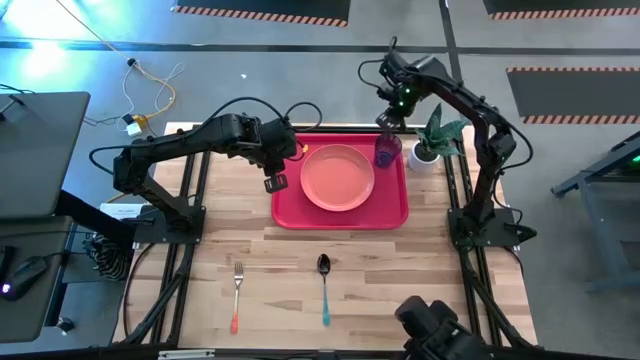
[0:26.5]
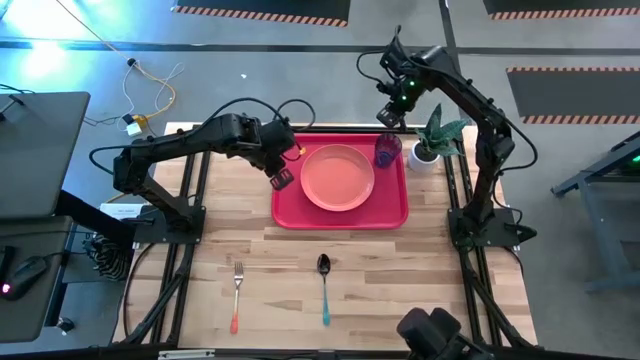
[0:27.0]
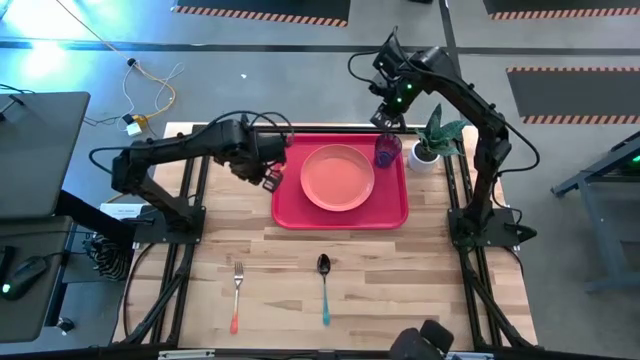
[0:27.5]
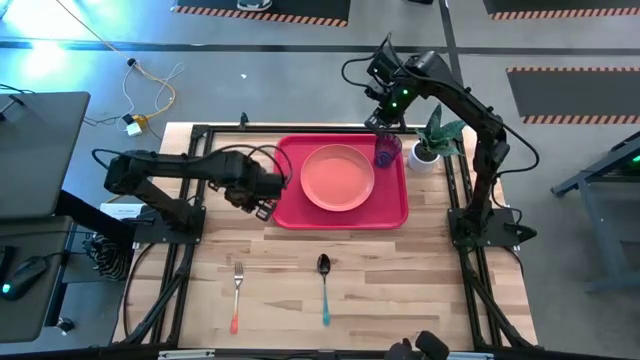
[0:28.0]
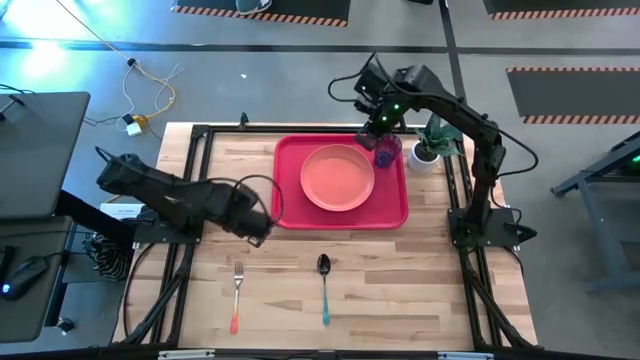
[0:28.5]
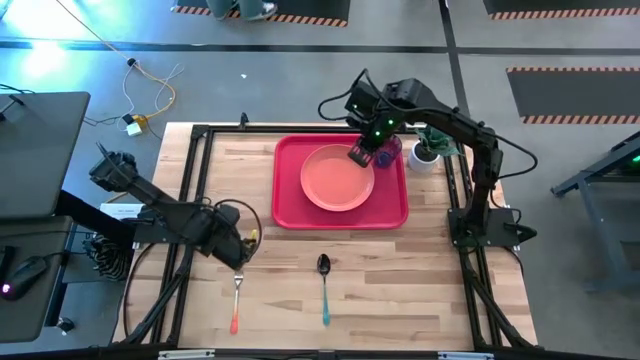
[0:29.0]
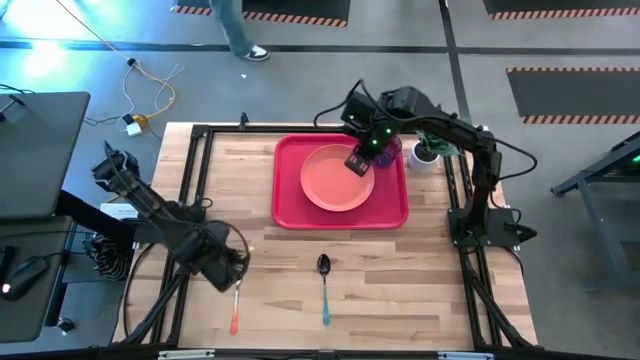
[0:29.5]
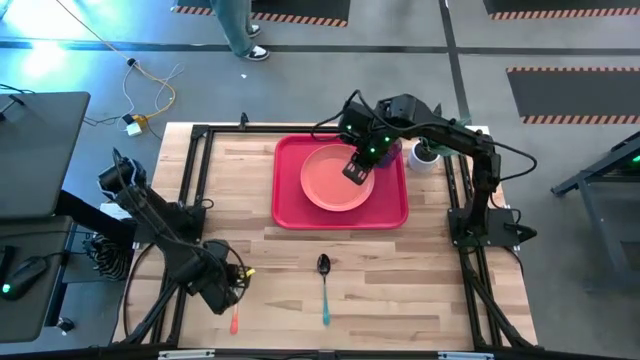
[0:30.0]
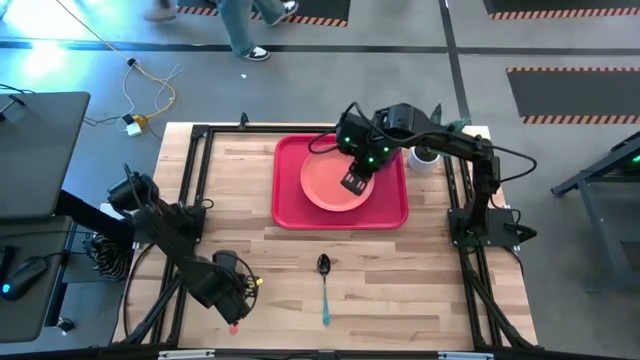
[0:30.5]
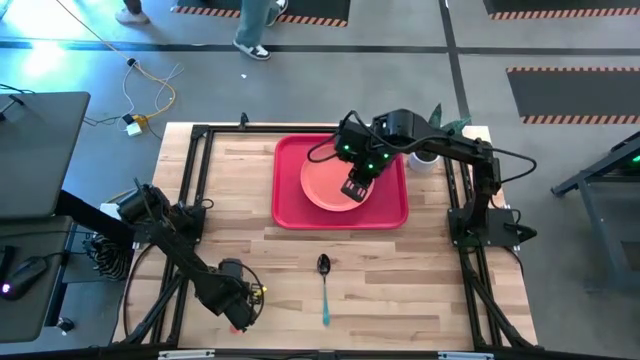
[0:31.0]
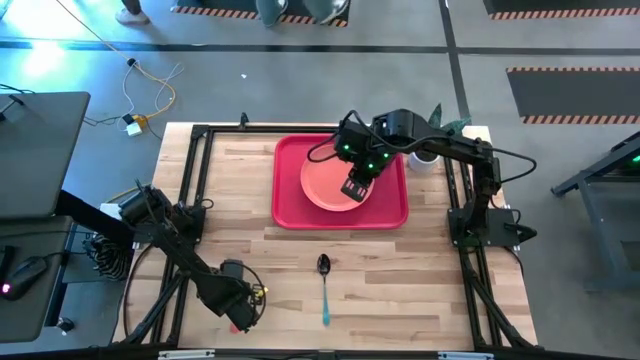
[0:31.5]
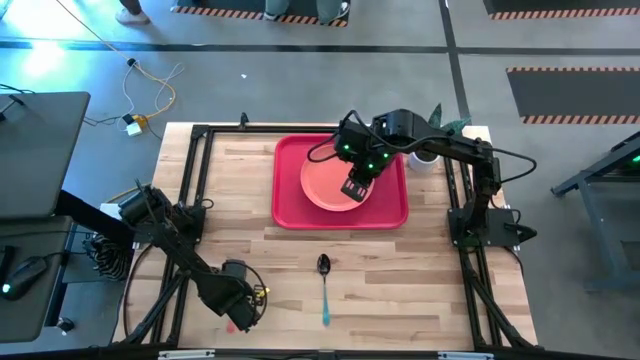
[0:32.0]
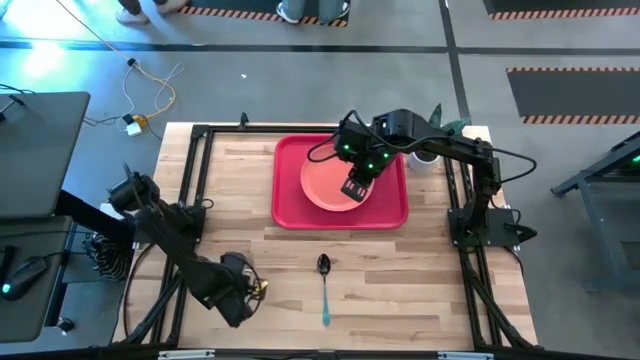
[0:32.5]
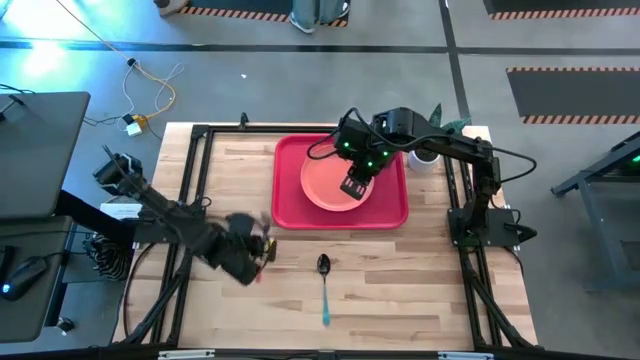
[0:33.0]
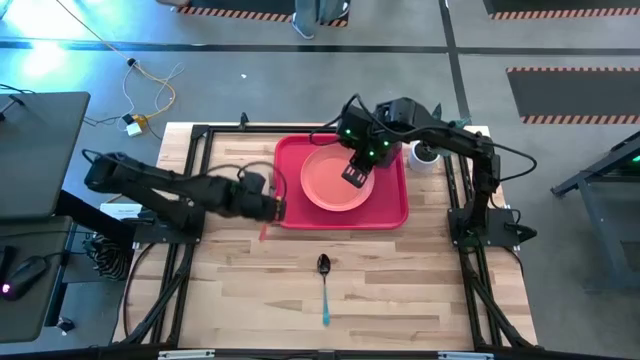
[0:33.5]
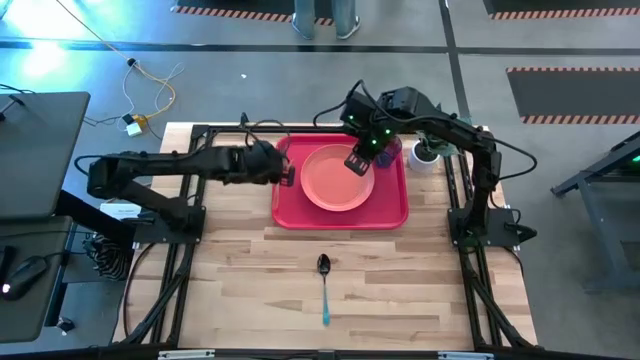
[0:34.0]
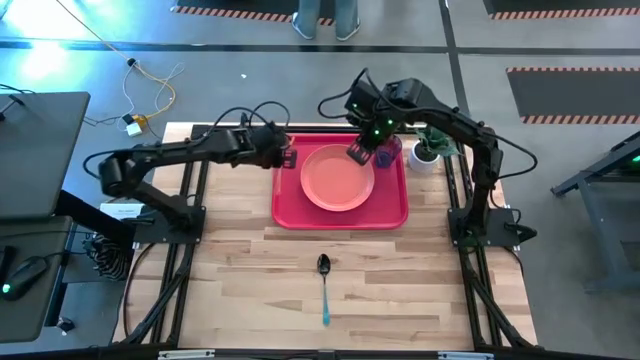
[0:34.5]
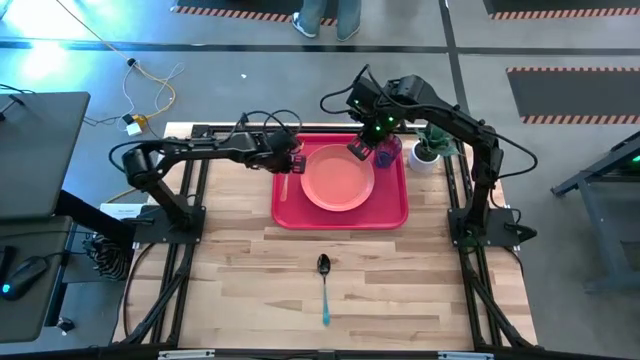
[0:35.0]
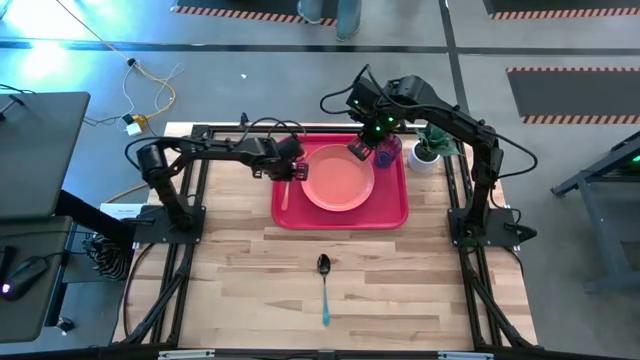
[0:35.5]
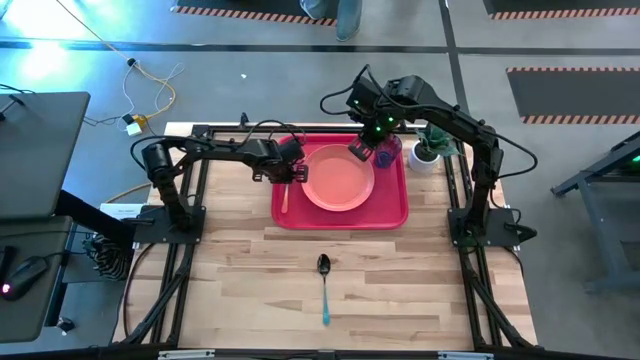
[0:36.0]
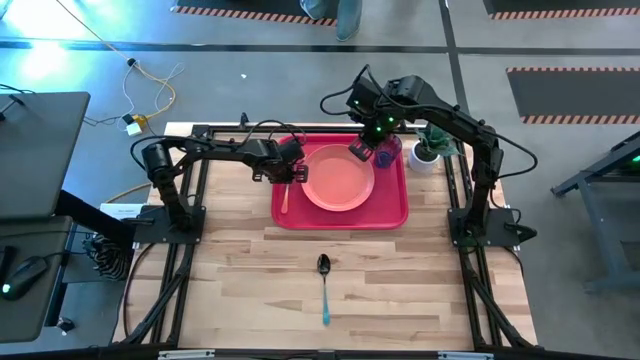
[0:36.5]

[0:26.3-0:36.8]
Task: Pick and place plate/cup/fork/spoon on tray
Put the orange fork to the left side of the orange plate on the tray

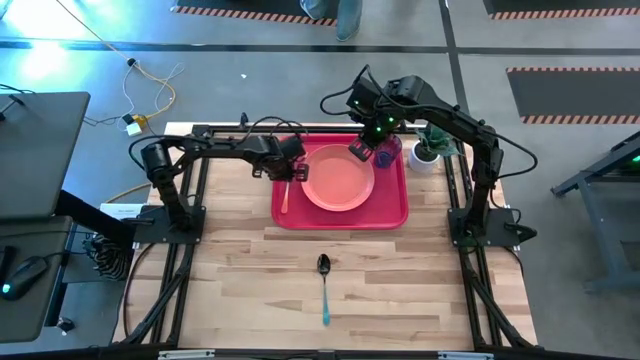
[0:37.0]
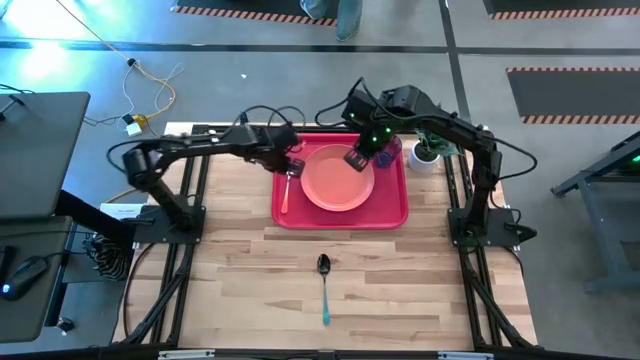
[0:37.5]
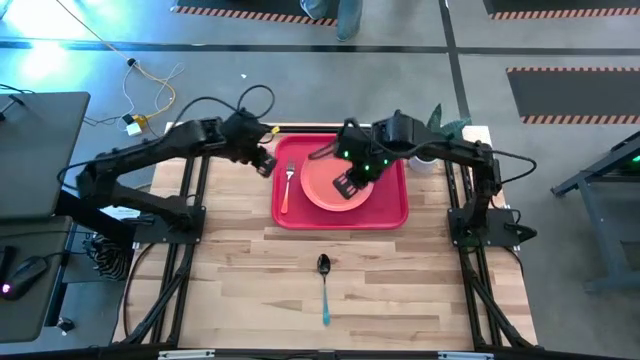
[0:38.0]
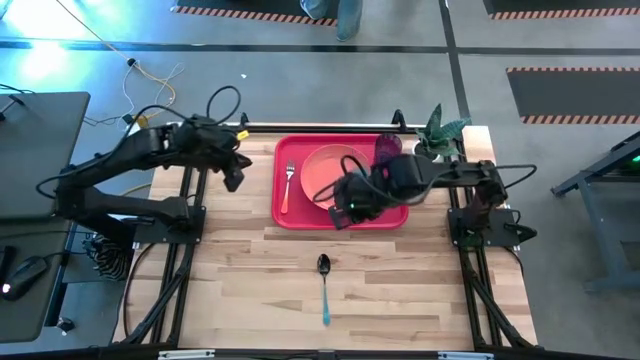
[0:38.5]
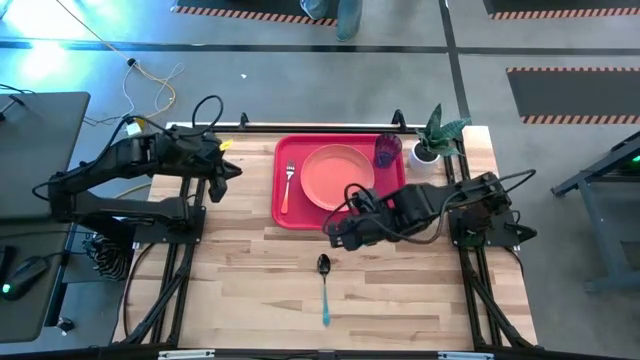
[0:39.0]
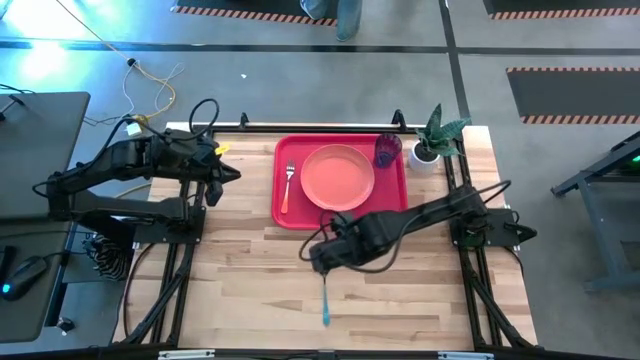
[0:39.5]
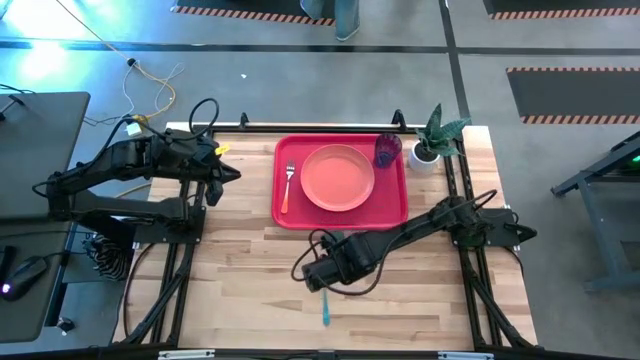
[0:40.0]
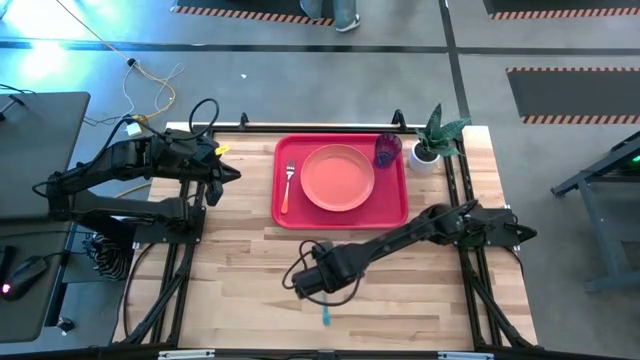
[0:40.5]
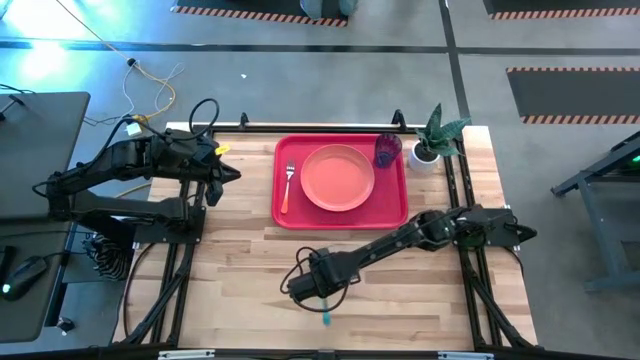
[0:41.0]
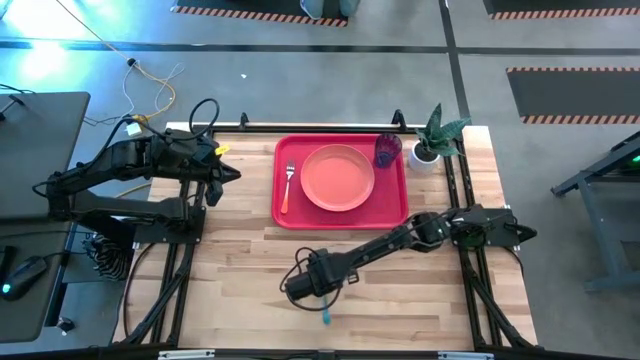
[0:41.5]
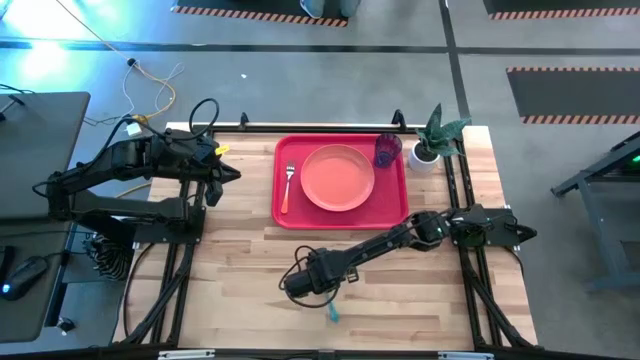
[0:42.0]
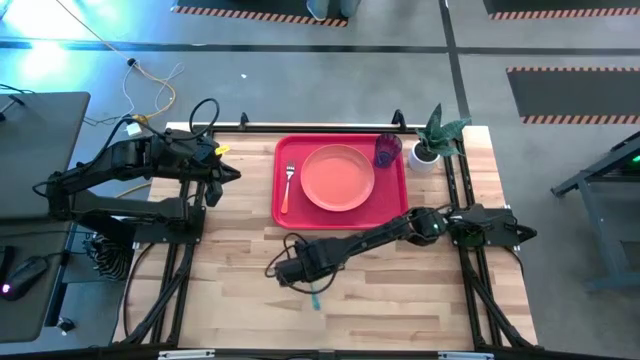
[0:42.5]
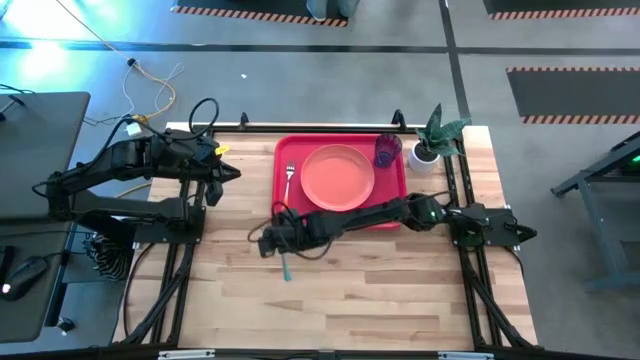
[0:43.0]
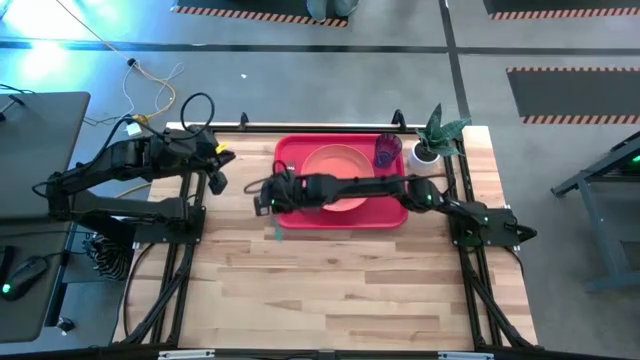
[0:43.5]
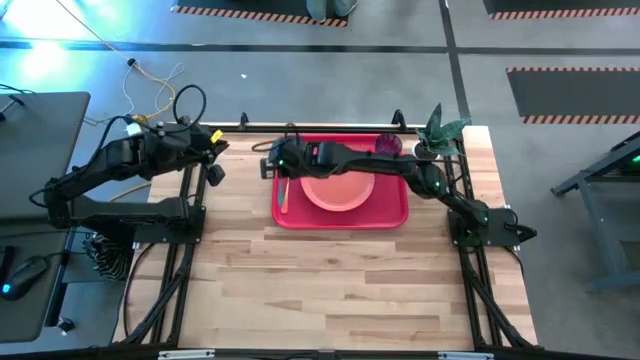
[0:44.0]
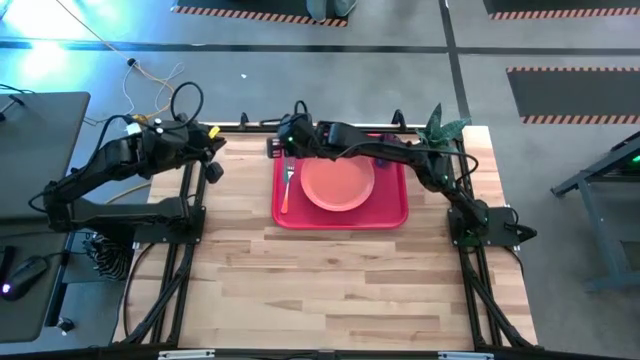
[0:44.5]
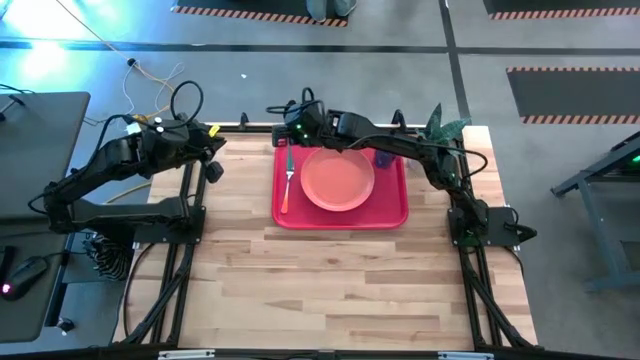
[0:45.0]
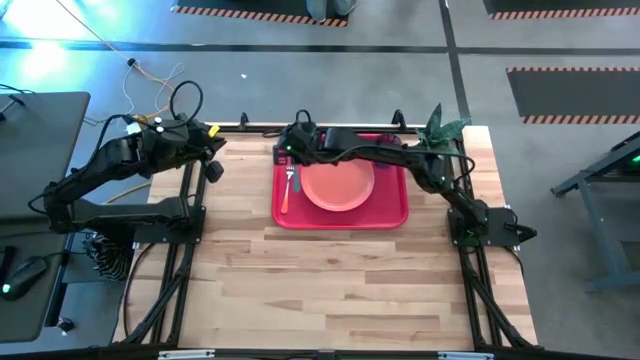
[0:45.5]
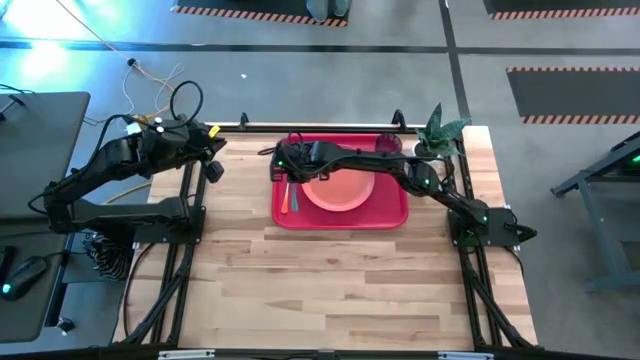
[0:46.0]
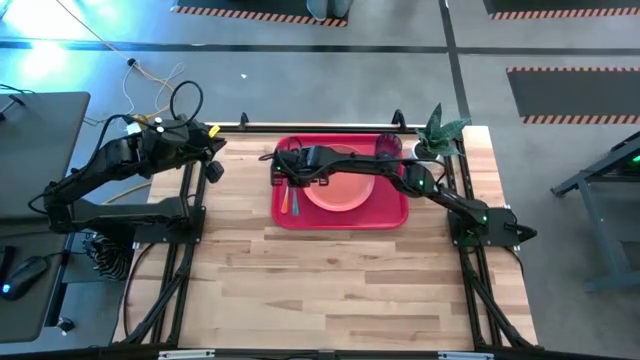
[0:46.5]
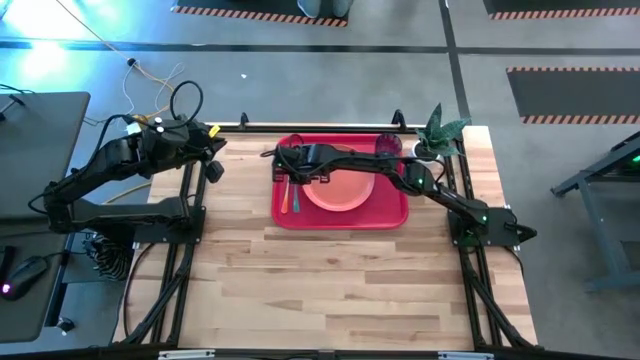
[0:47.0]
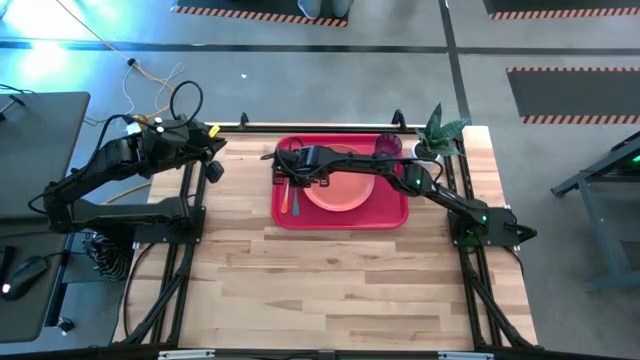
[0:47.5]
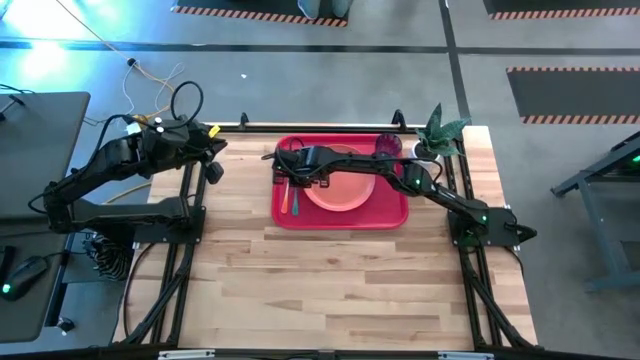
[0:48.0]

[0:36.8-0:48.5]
Put the black spoon beside the orange fork on the tray
